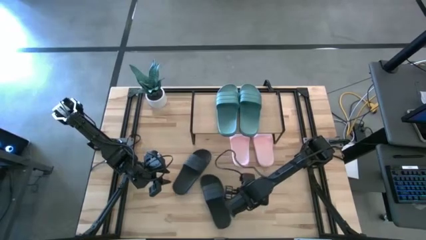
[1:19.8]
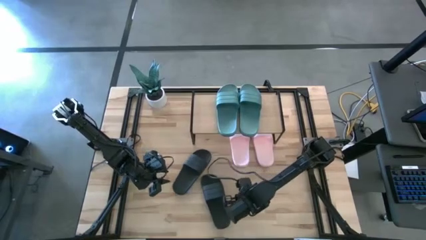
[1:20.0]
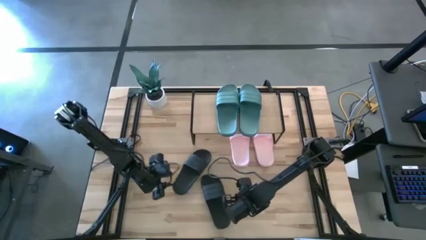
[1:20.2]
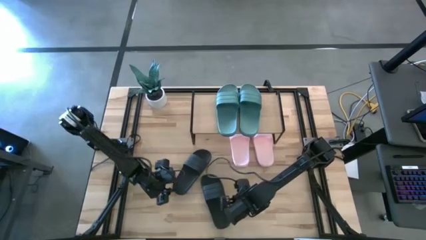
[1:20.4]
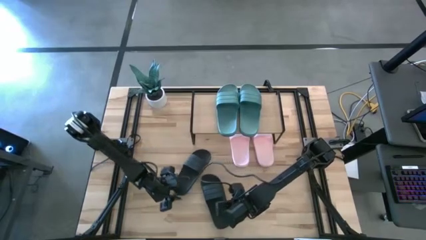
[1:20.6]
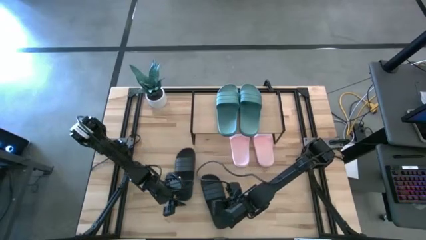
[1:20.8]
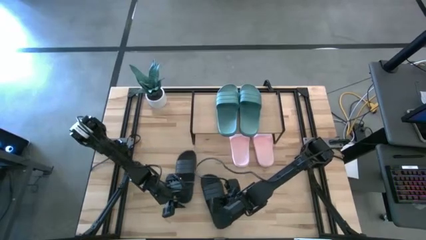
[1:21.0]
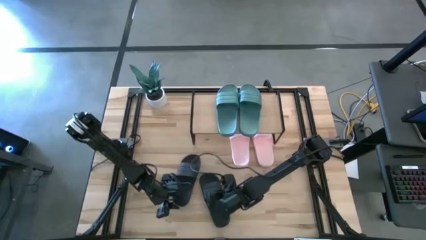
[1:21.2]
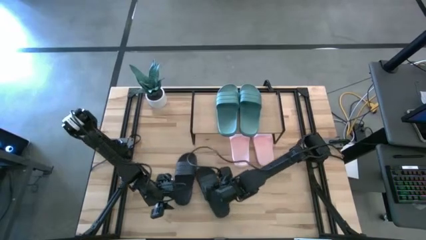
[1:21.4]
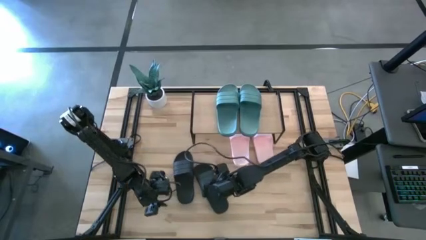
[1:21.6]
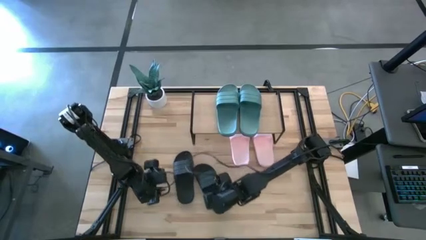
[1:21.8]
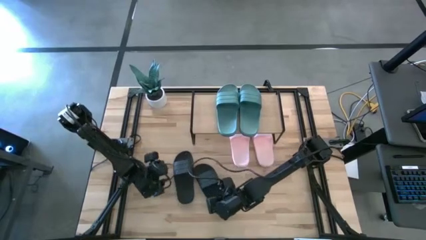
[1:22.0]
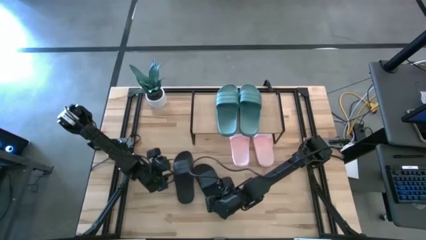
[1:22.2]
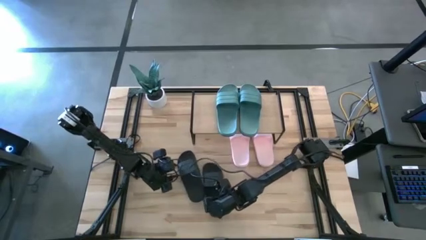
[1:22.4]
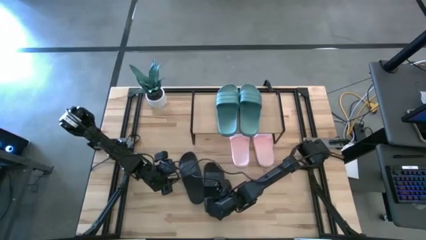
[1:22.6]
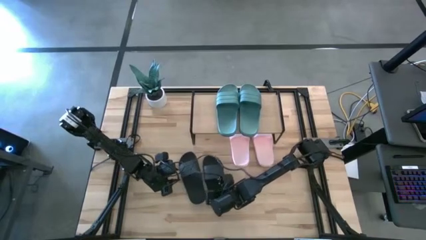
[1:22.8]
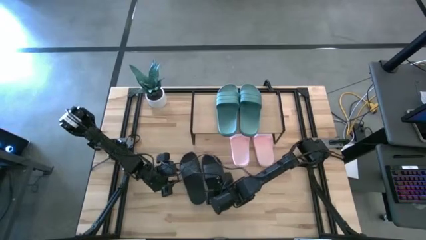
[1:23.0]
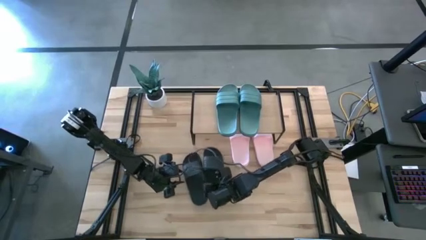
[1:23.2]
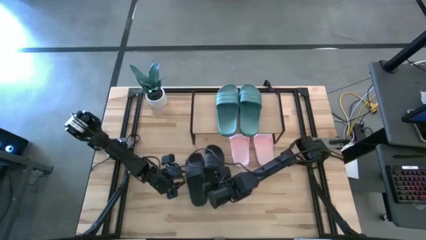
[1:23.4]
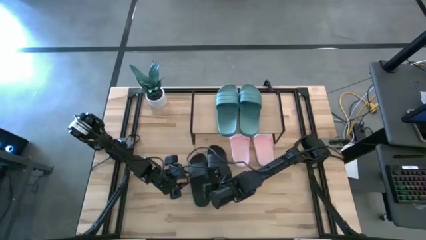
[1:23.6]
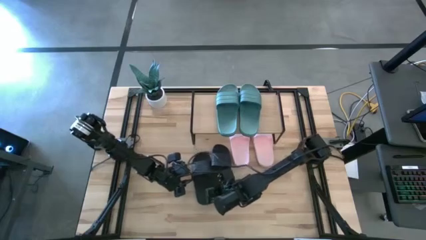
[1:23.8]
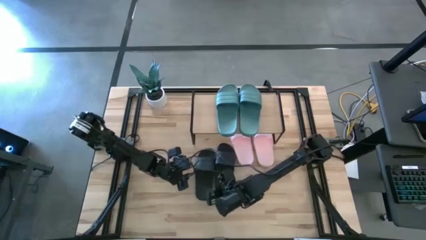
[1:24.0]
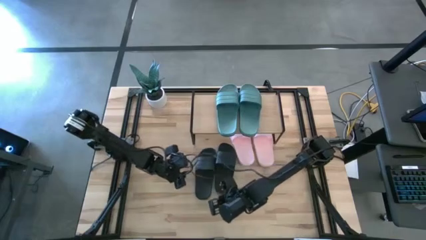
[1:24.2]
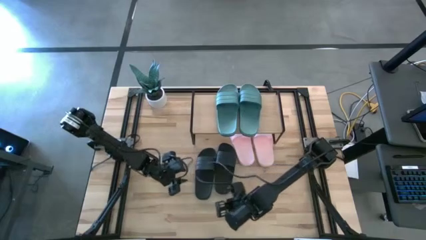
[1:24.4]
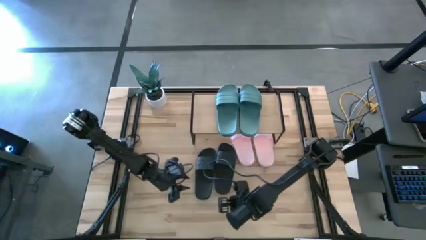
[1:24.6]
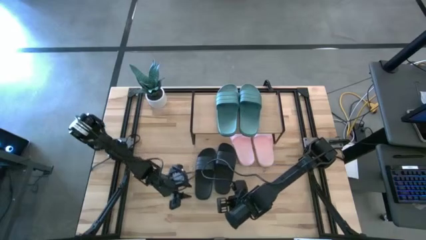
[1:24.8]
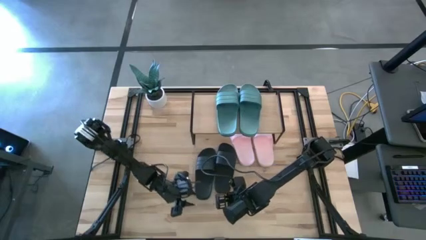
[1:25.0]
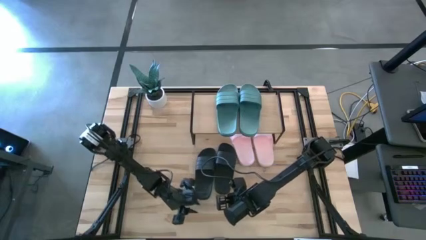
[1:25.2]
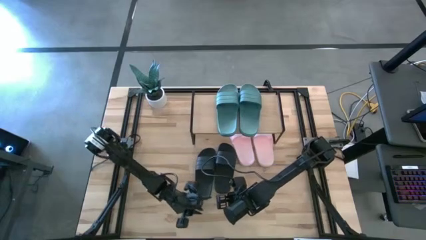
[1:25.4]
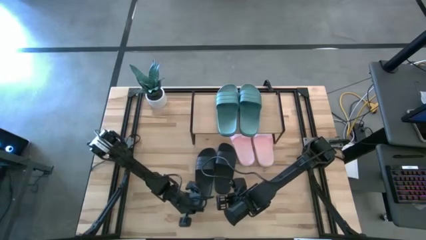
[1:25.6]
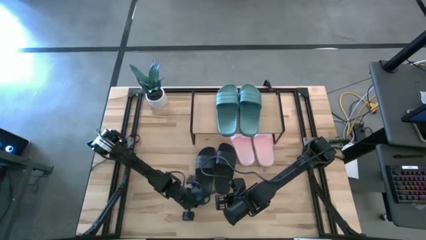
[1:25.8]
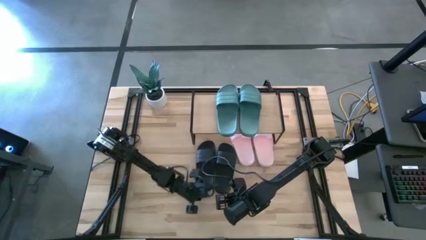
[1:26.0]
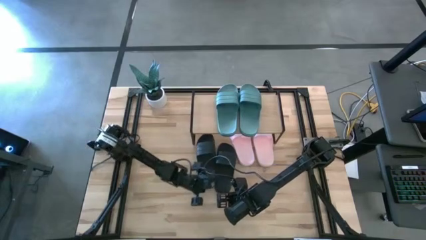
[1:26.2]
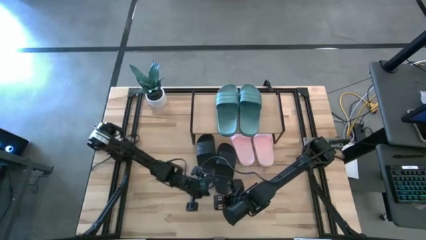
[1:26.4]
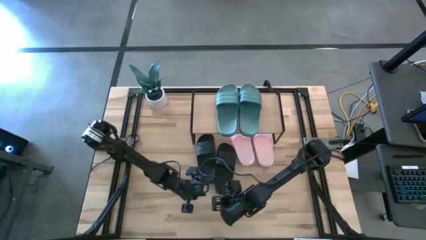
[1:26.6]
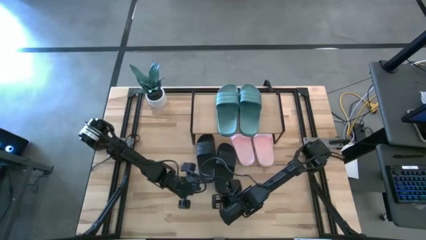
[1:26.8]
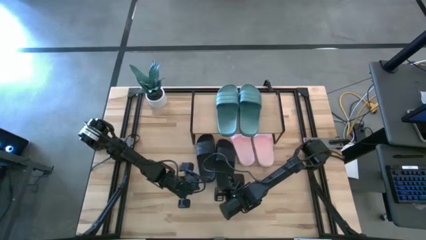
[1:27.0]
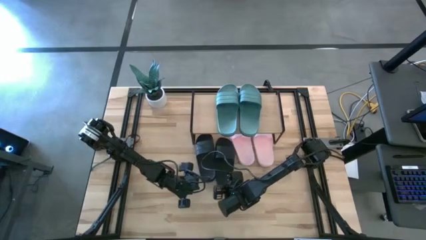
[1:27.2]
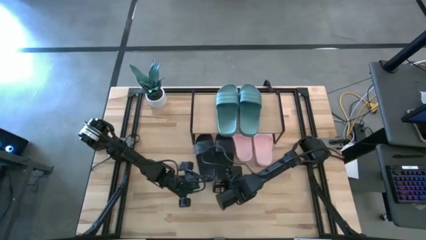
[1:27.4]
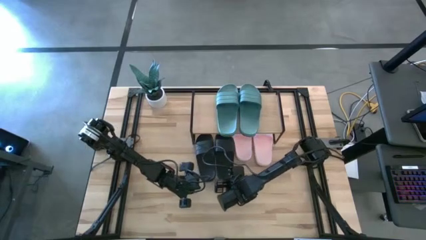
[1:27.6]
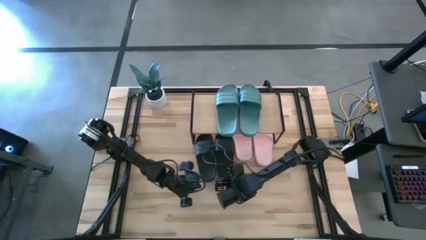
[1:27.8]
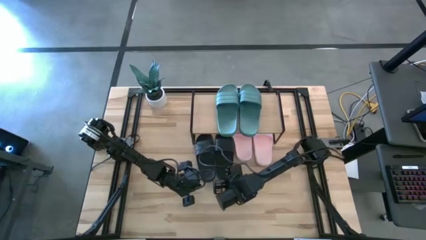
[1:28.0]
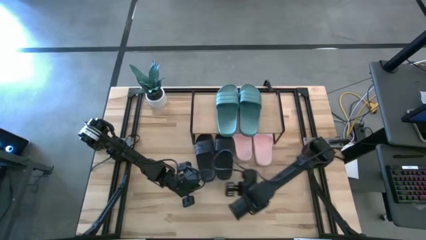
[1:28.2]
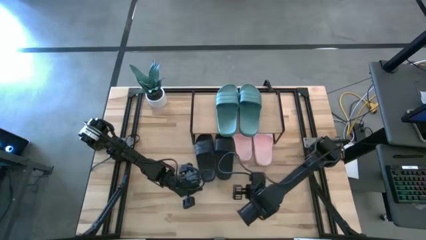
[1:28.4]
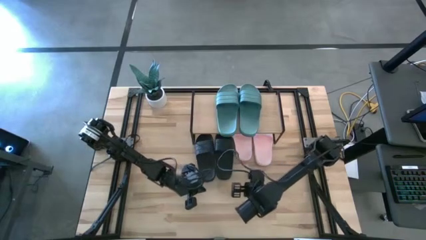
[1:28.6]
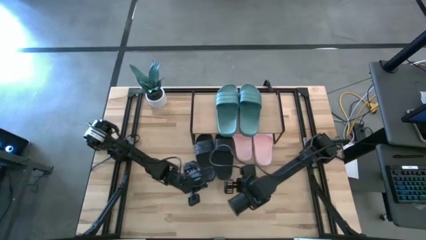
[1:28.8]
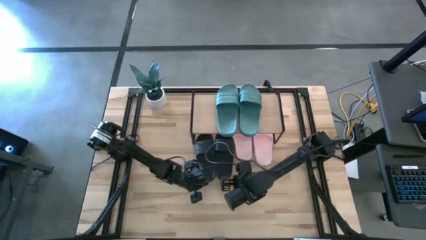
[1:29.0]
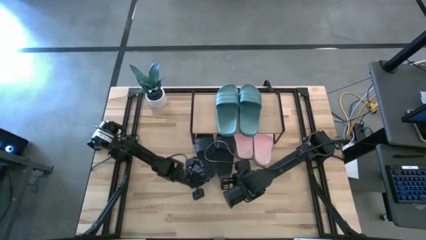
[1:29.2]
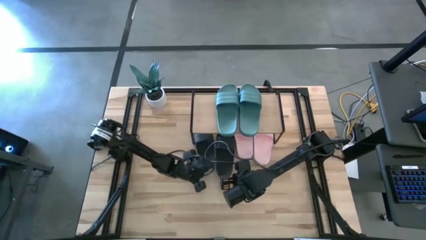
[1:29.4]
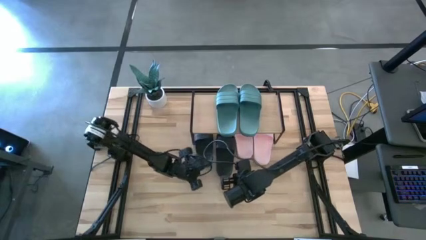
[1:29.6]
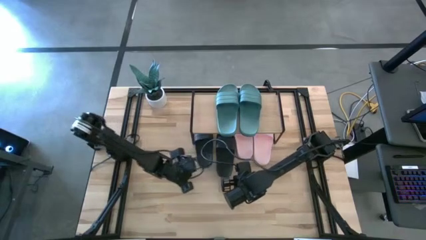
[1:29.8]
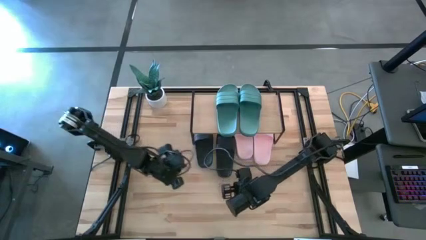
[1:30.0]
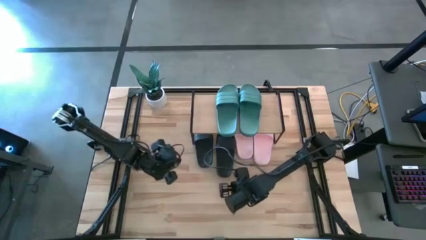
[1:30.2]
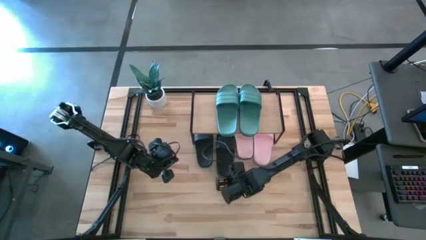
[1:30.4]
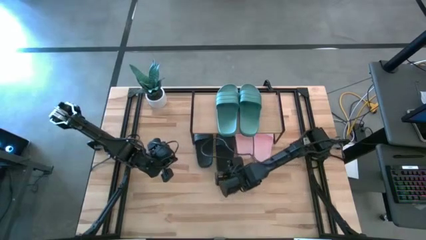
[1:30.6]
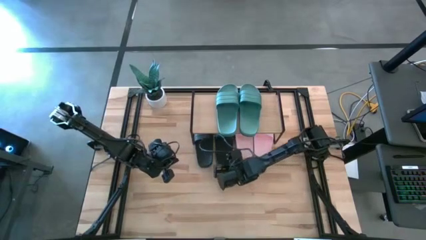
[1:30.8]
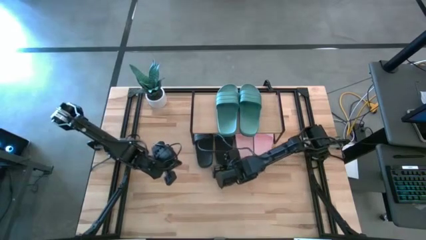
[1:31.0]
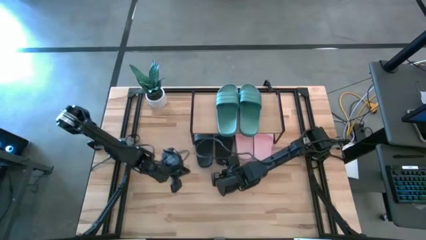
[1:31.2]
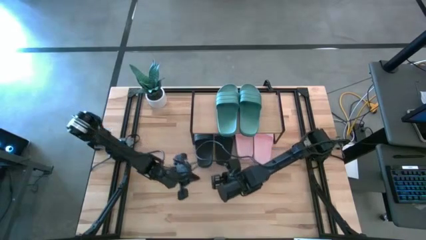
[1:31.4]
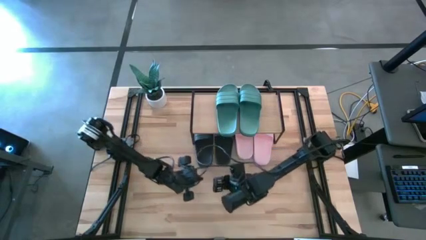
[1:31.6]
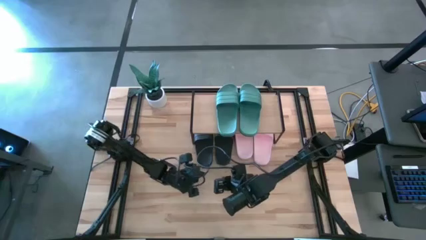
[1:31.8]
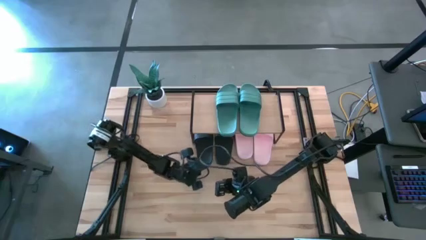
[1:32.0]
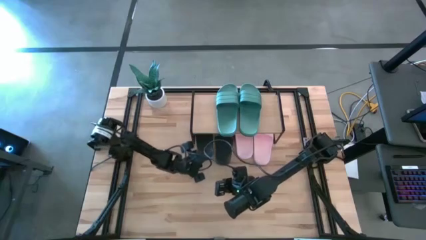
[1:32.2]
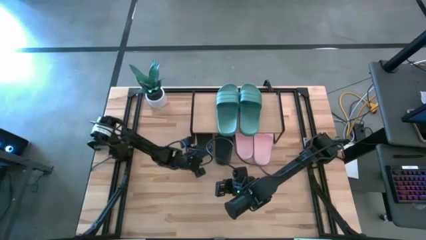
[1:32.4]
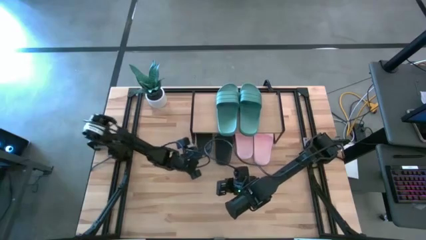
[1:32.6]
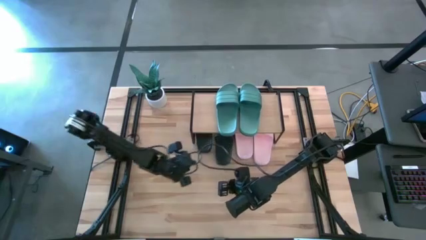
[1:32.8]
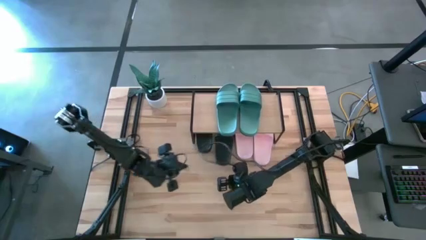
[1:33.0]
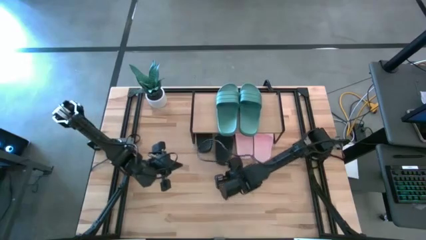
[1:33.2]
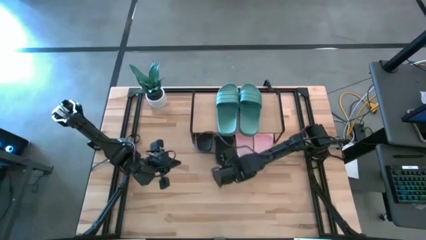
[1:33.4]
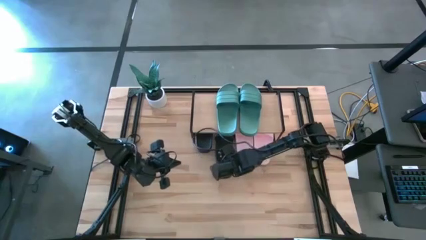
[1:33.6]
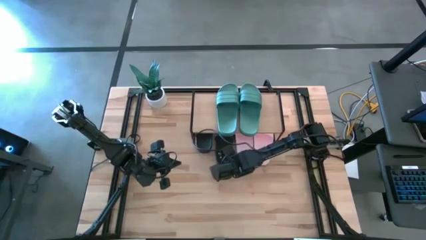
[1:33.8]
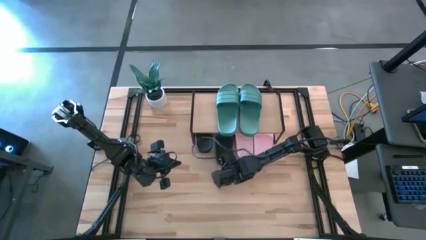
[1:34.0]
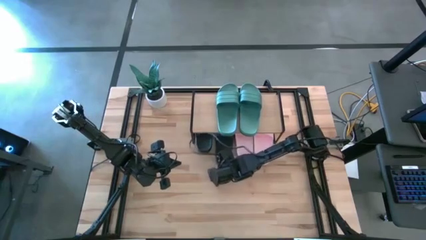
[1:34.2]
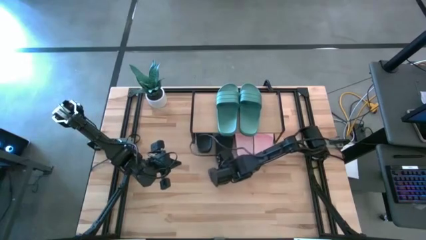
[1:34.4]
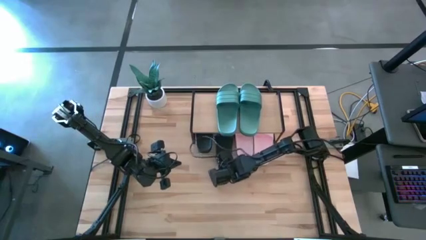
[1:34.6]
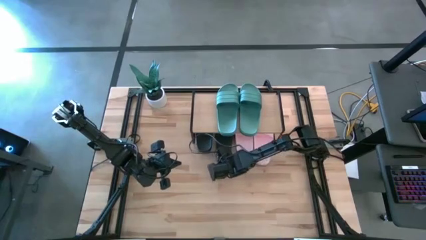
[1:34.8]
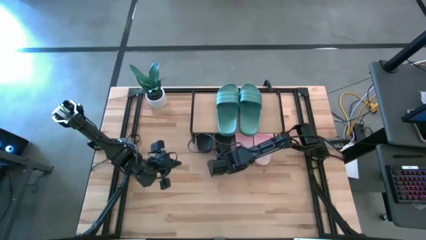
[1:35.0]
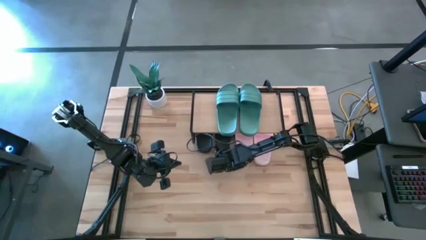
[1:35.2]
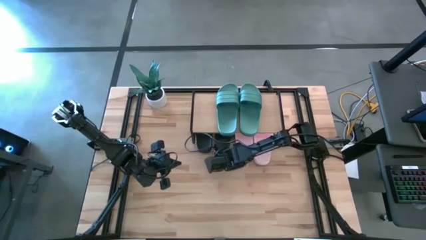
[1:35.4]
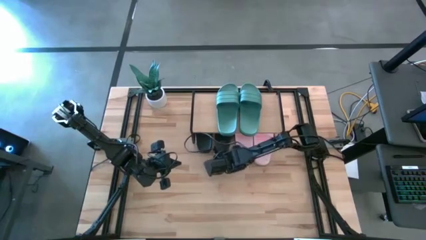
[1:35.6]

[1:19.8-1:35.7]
Task: Pick and place slides into the shelf
Move the black slippers under the shelf
